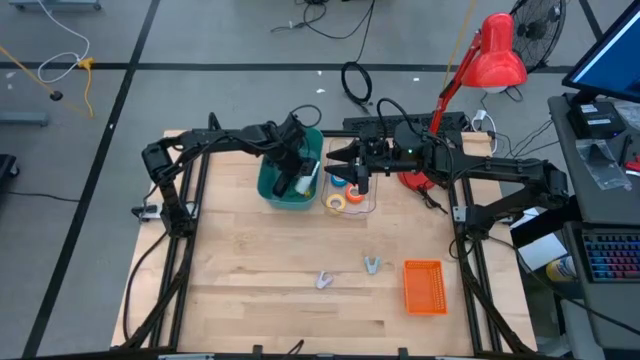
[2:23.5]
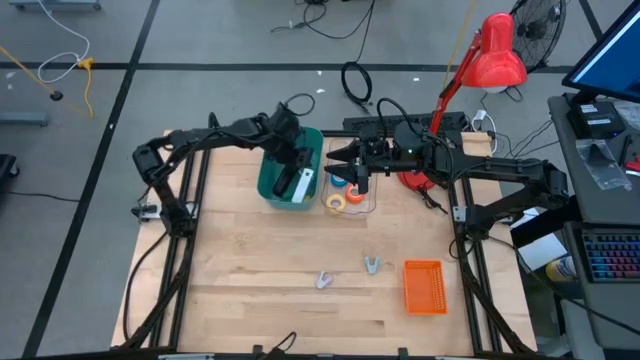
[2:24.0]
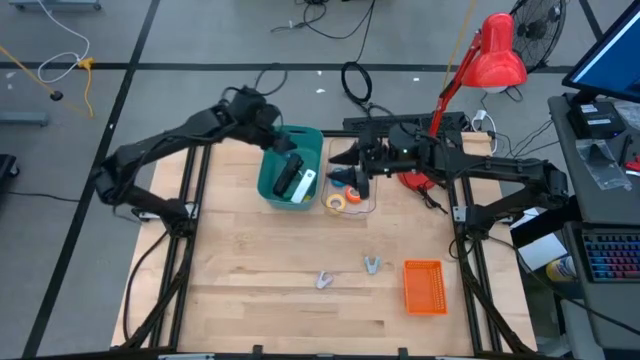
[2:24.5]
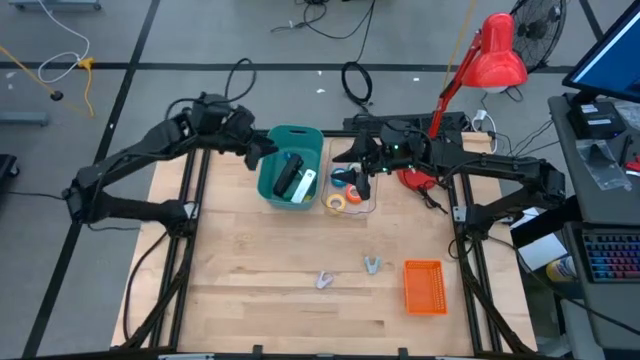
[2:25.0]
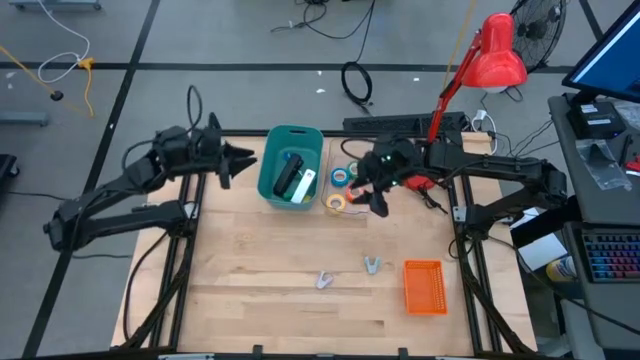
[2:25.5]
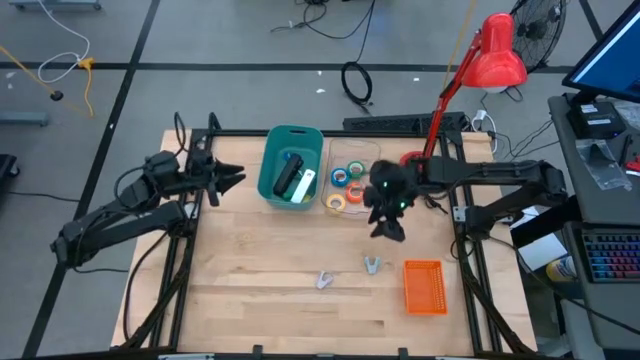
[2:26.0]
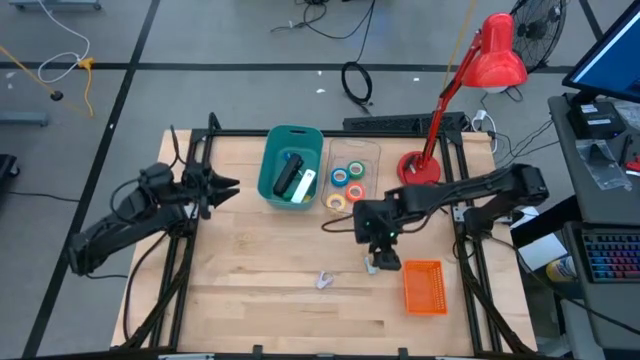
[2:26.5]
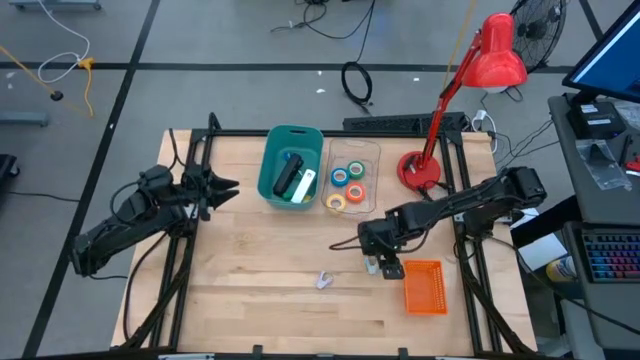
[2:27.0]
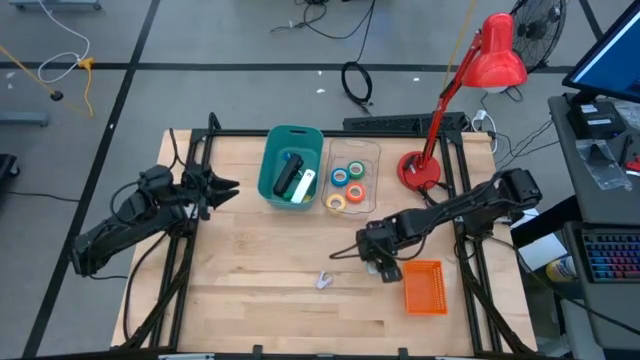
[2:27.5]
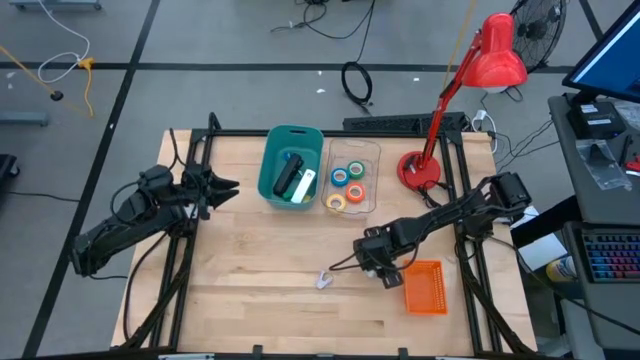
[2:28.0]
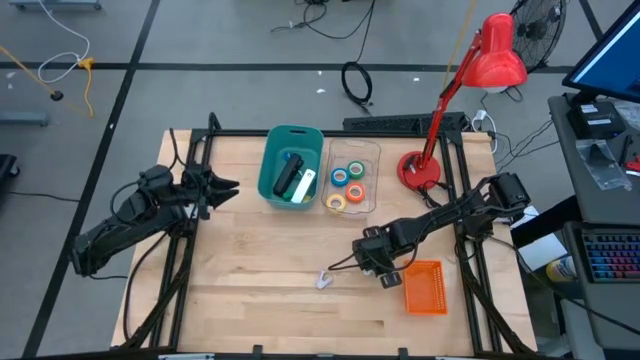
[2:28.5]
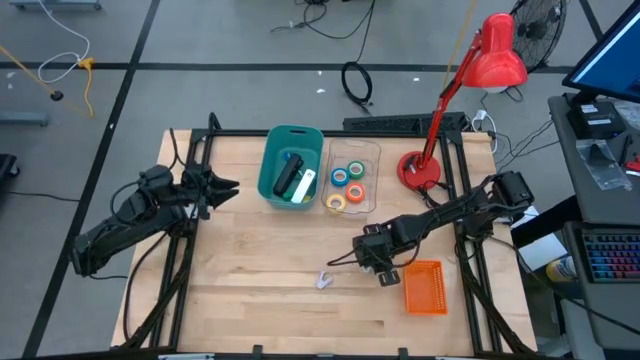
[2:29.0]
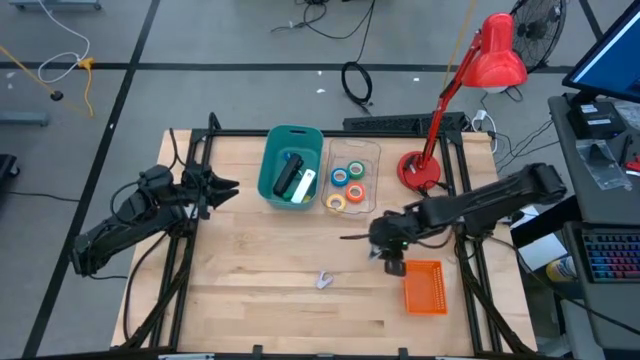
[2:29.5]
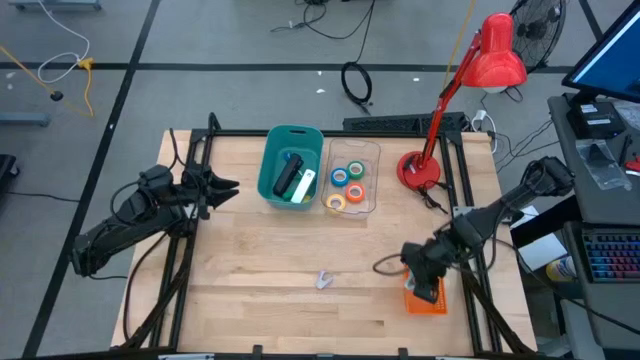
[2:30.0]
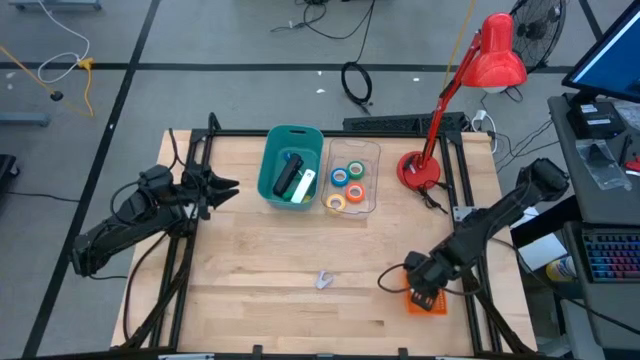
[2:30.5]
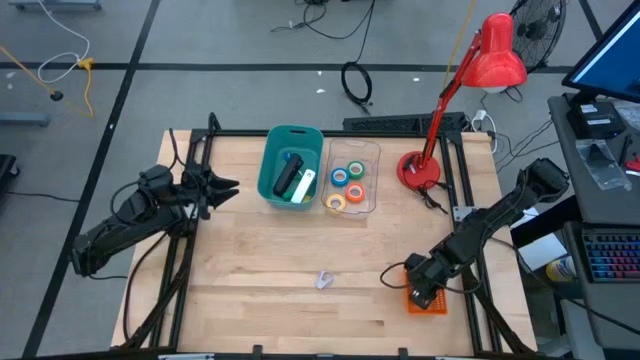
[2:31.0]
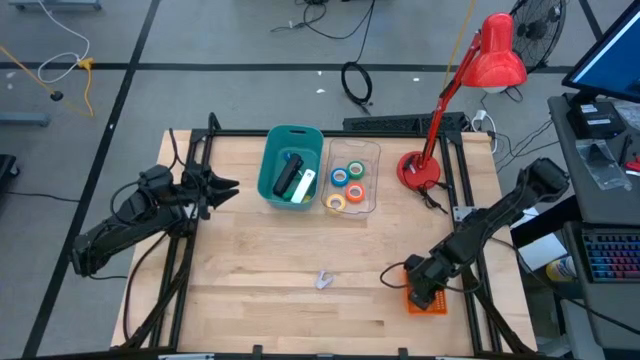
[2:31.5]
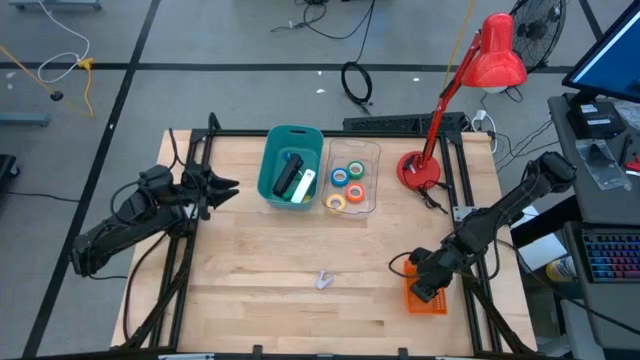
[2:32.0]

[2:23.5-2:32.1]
Task: Pick and place Stapler, Stapler remover, tape
Put the blue stapler remover into the orange bin

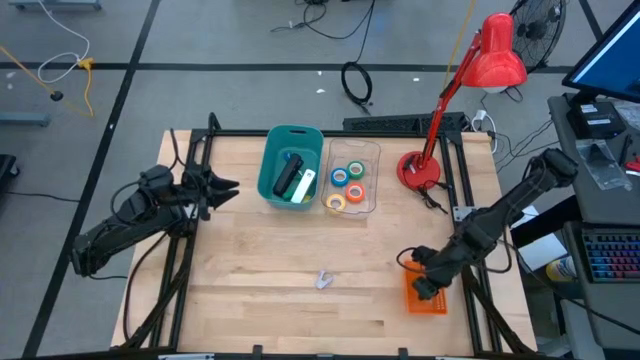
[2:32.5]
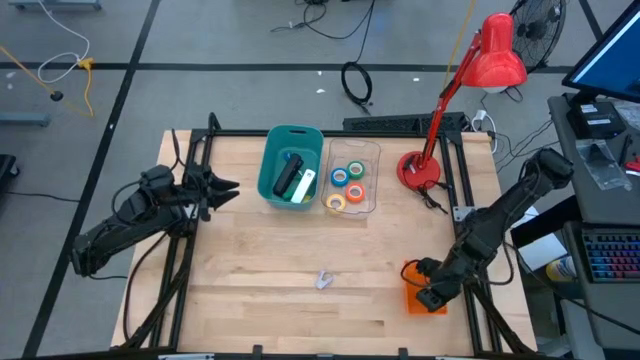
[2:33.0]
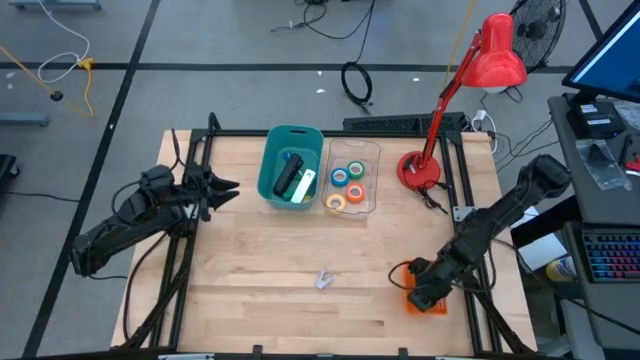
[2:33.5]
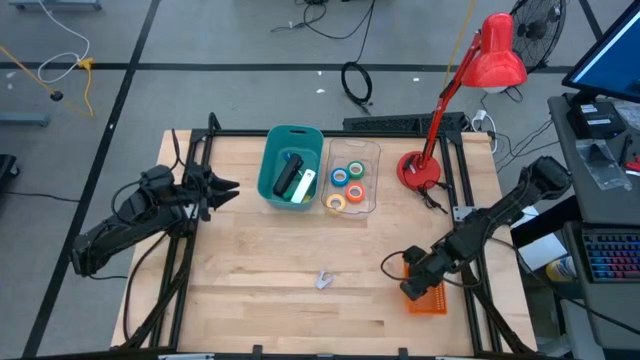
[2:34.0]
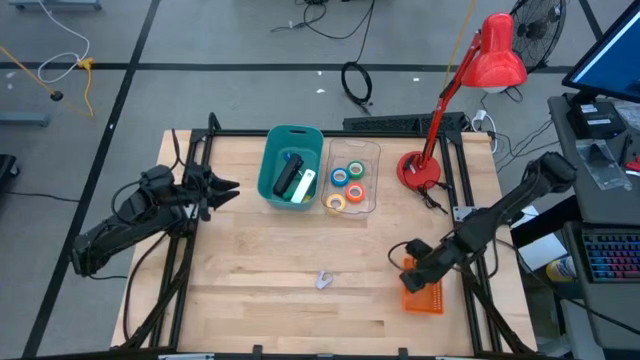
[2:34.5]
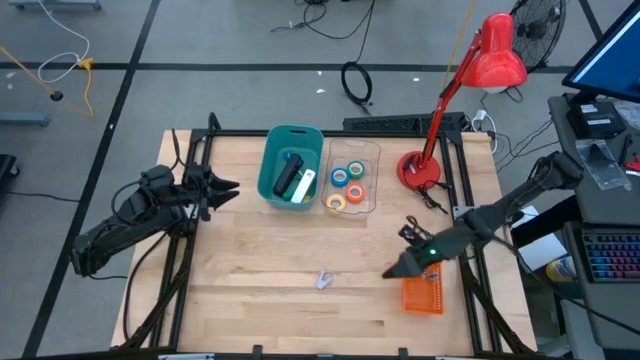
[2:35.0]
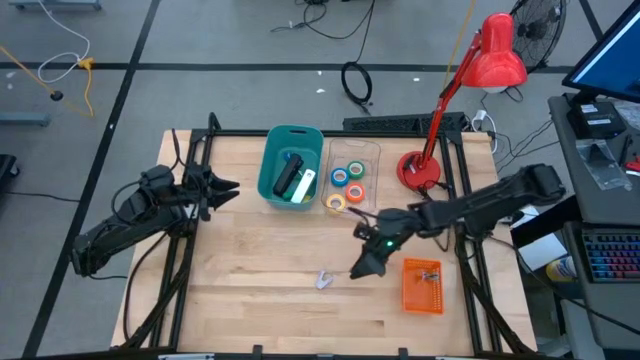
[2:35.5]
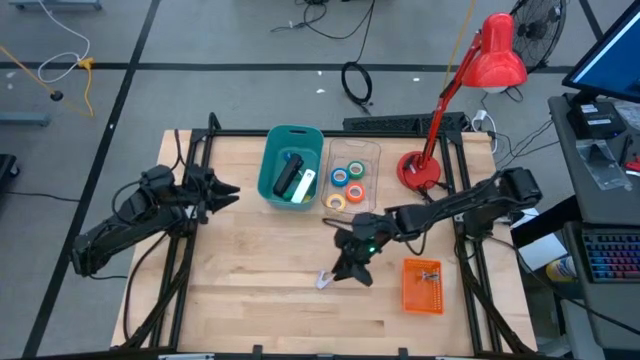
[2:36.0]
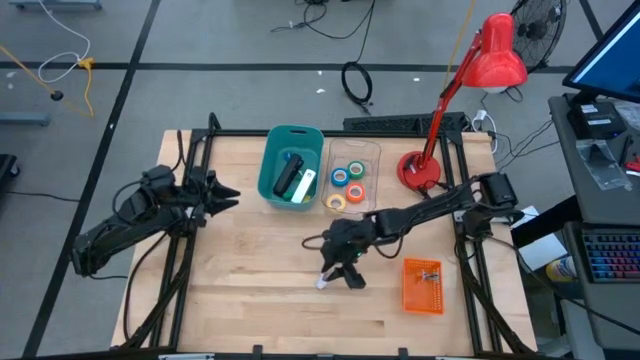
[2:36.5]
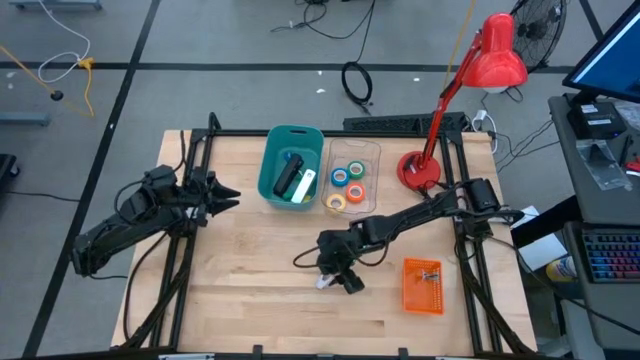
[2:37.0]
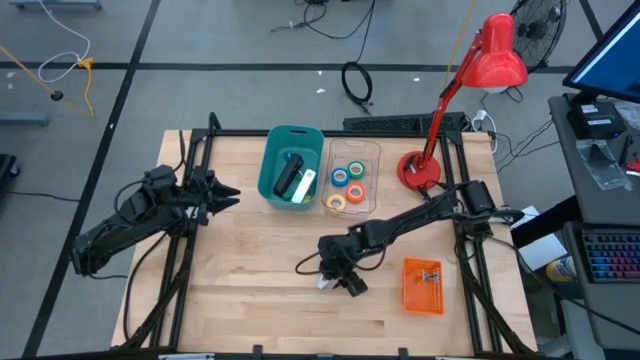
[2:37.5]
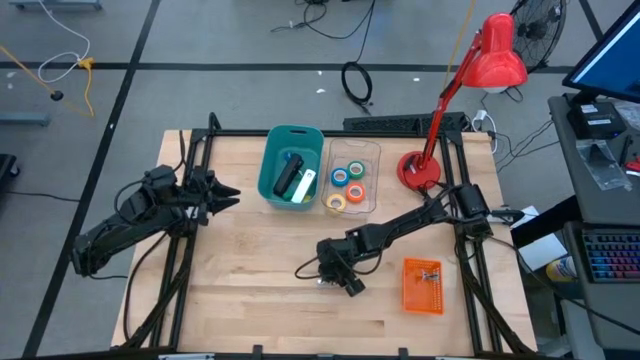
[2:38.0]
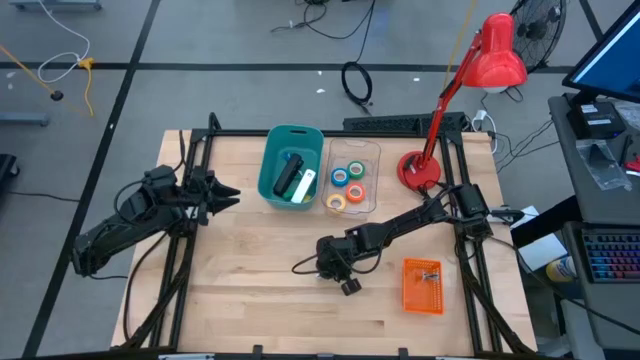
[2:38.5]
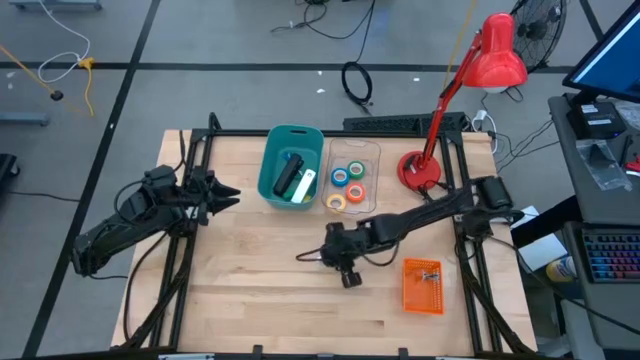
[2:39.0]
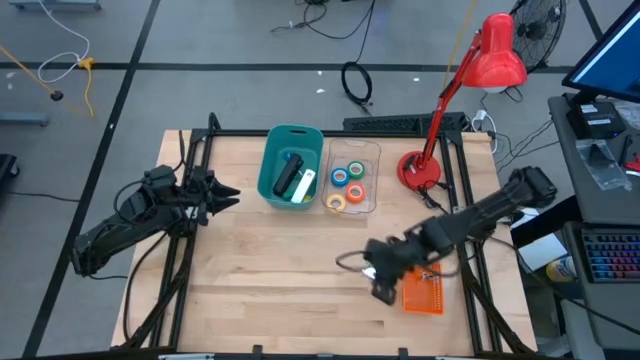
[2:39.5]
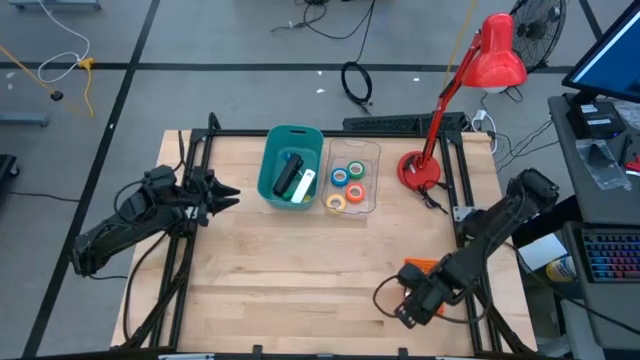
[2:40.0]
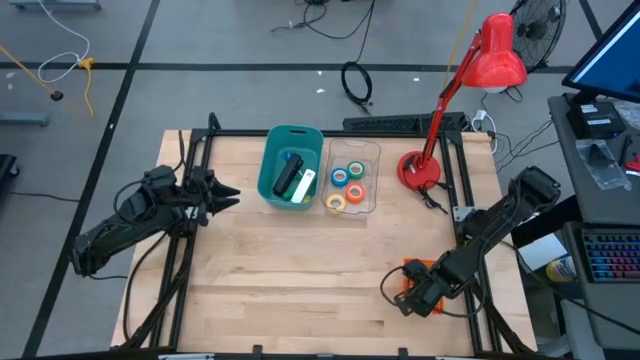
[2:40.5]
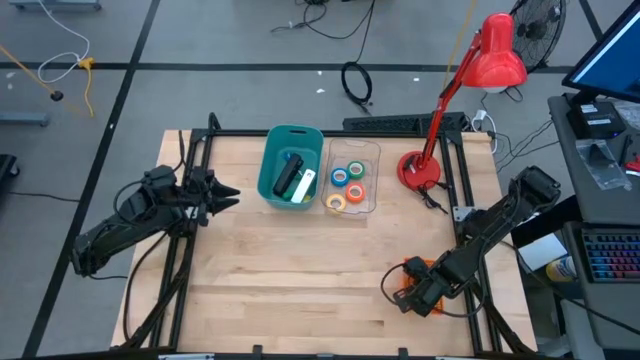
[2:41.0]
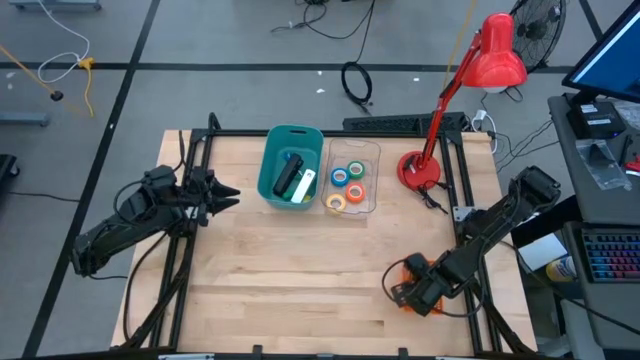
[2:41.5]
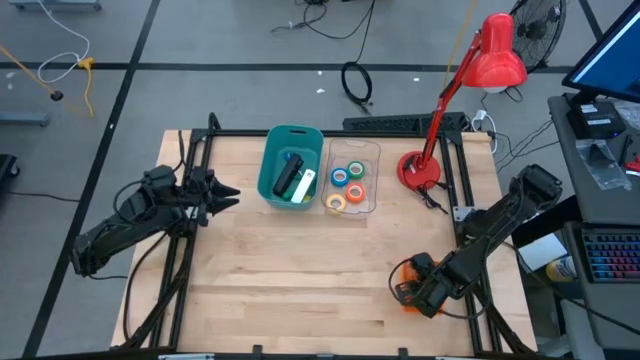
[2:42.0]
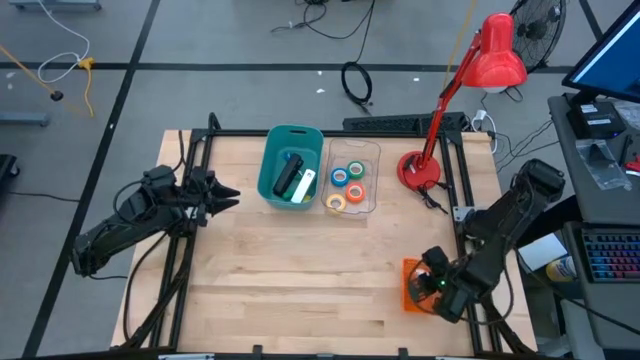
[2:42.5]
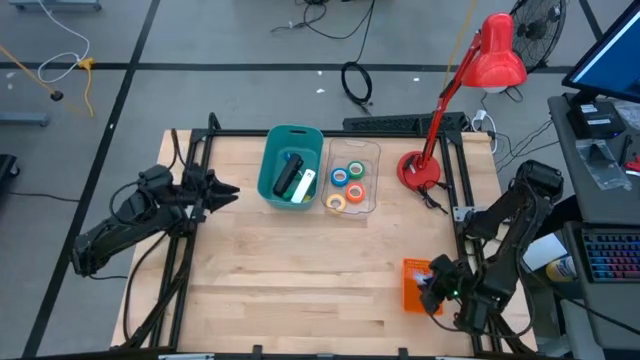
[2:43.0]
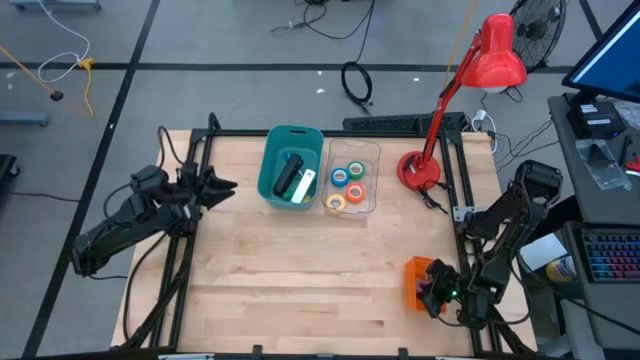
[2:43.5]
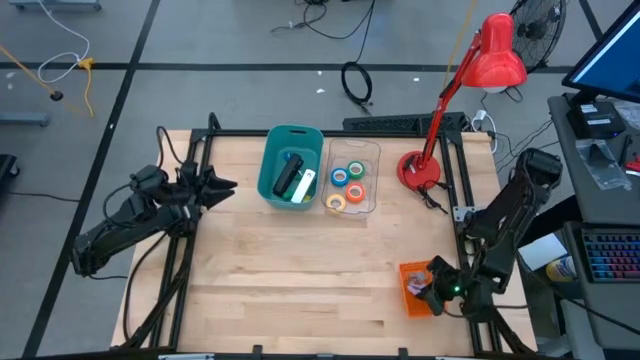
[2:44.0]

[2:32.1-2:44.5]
Put the purple stapler remover into the orange bin

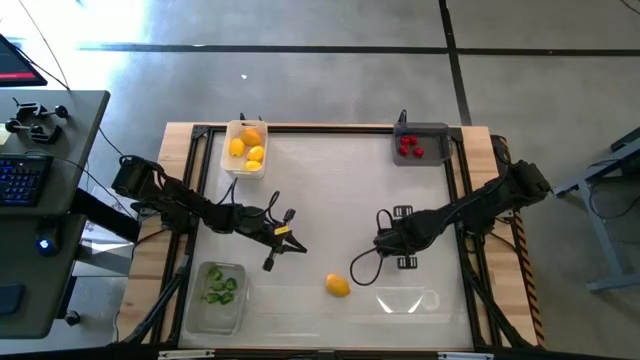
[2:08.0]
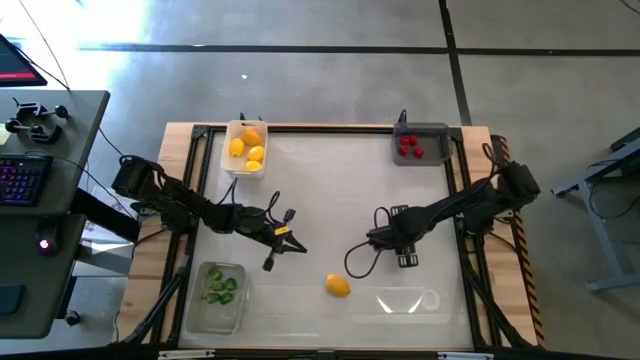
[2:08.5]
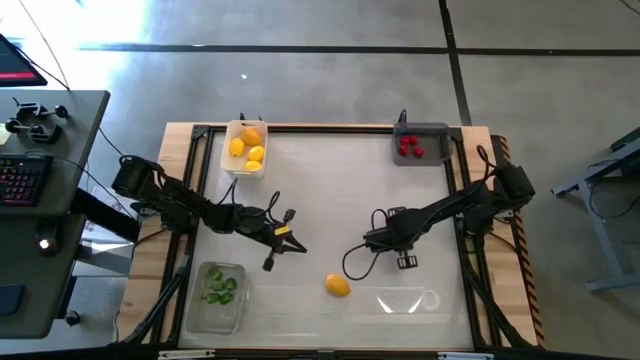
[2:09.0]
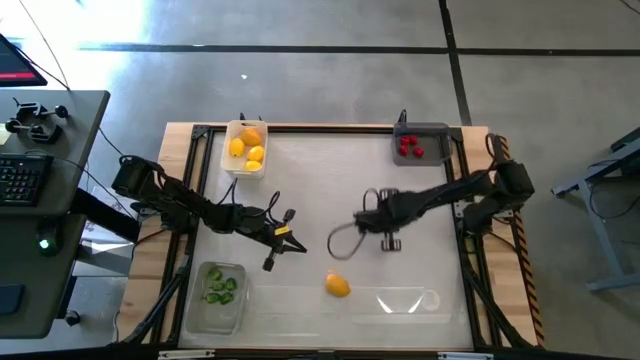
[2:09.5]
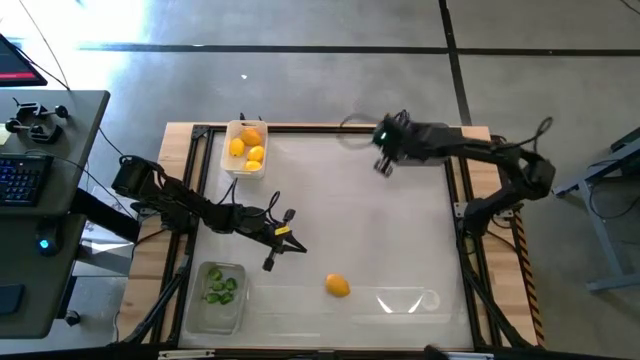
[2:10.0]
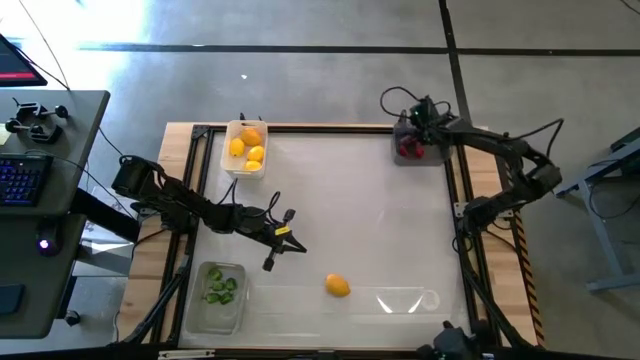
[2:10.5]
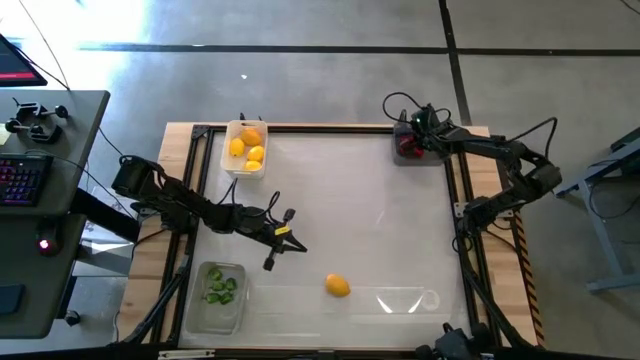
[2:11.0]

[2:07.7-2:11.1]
Task: Sort produce into baskets
Put the red bell pepper into the black bin
